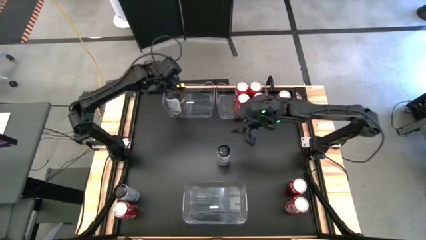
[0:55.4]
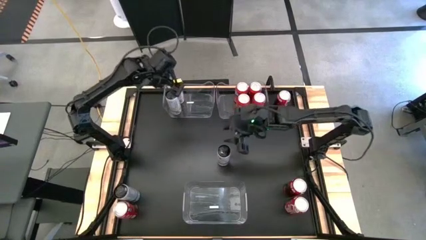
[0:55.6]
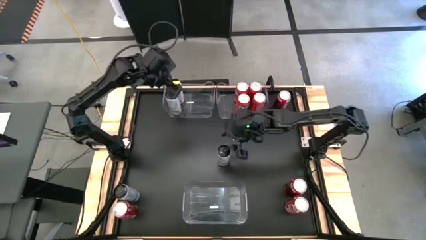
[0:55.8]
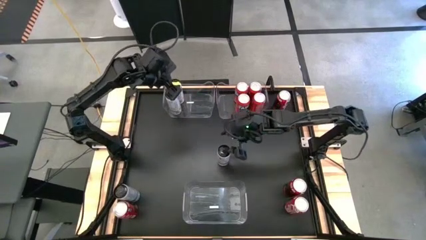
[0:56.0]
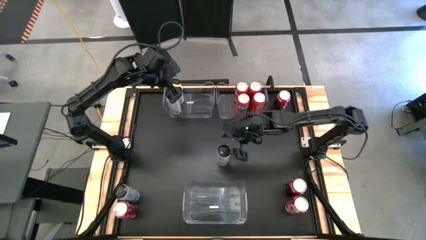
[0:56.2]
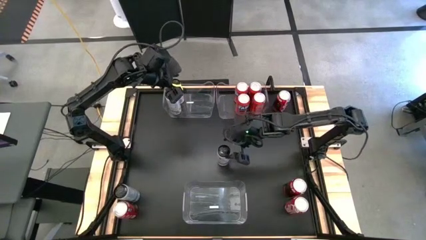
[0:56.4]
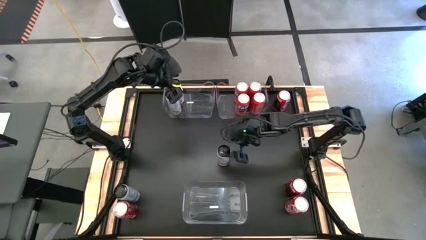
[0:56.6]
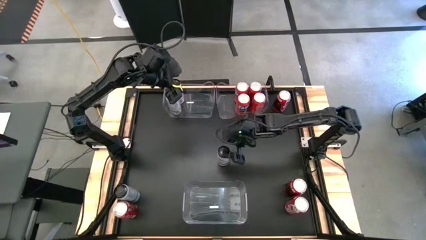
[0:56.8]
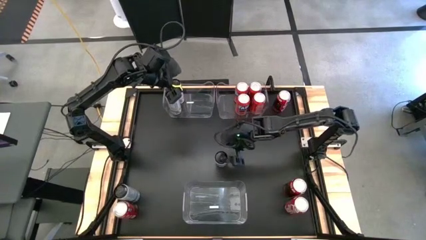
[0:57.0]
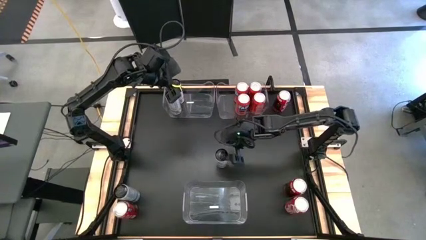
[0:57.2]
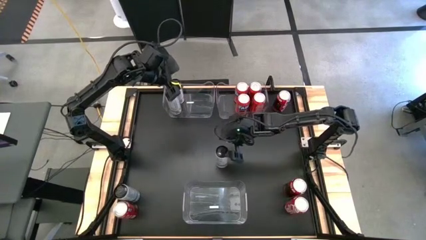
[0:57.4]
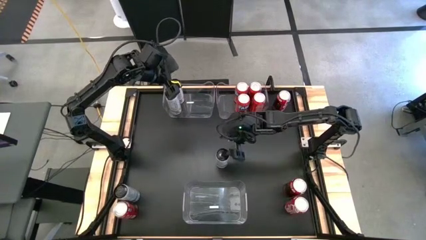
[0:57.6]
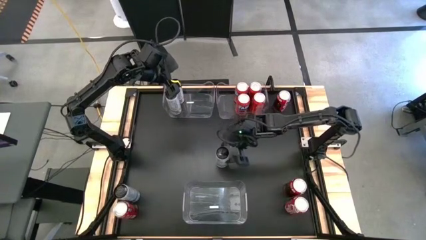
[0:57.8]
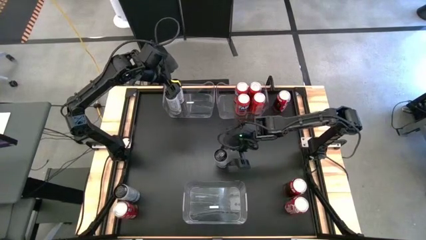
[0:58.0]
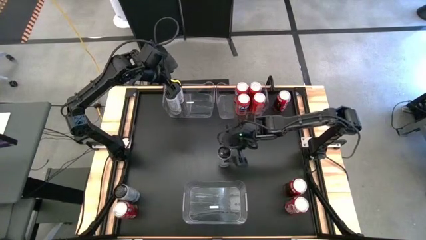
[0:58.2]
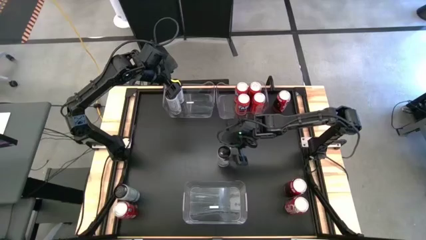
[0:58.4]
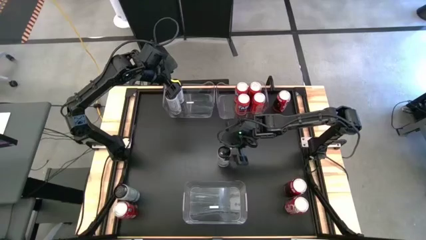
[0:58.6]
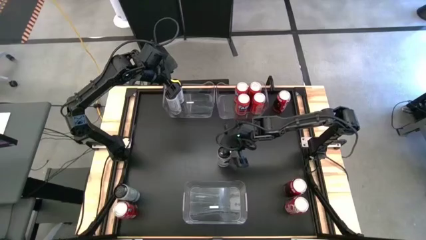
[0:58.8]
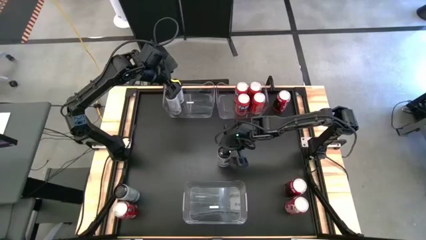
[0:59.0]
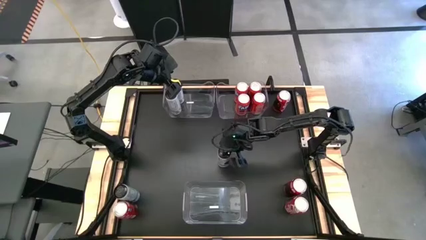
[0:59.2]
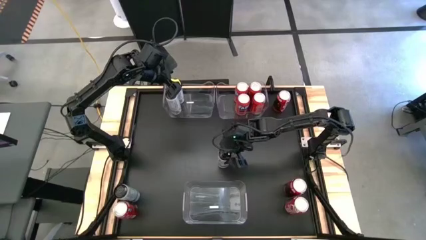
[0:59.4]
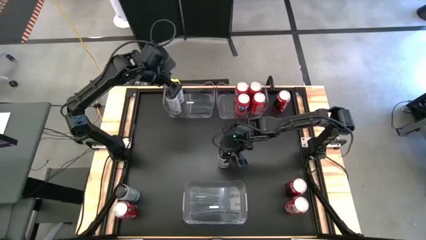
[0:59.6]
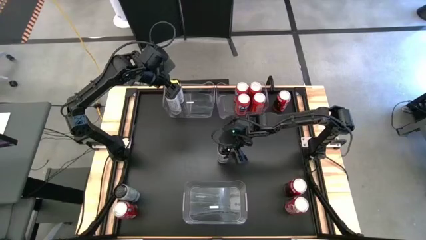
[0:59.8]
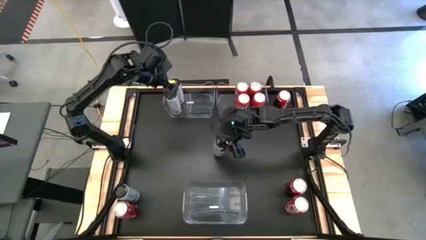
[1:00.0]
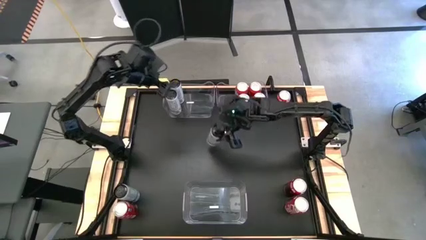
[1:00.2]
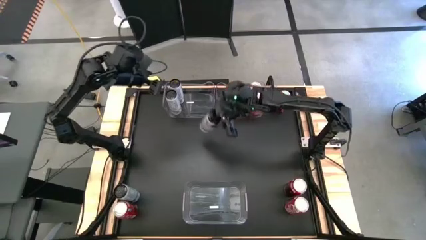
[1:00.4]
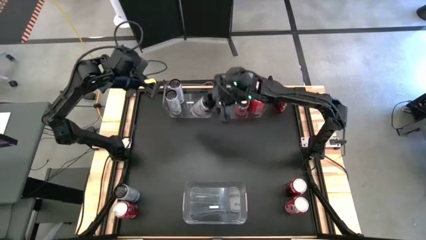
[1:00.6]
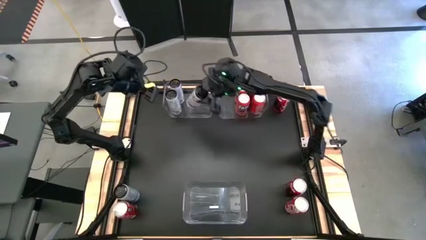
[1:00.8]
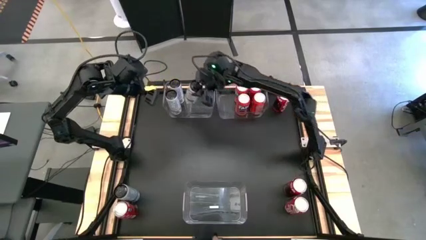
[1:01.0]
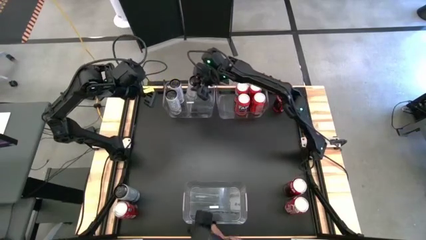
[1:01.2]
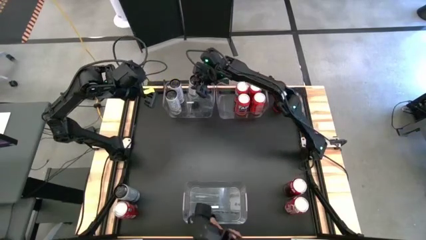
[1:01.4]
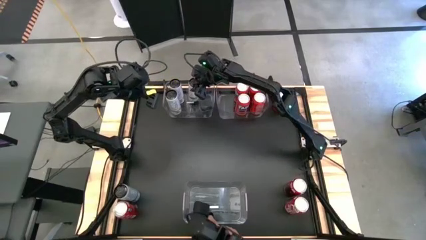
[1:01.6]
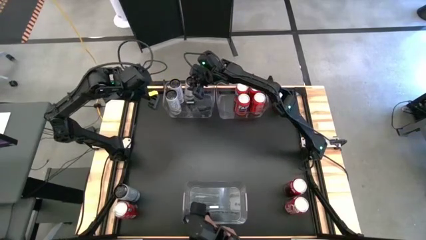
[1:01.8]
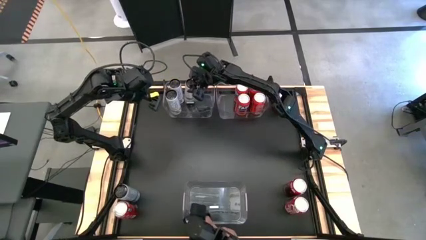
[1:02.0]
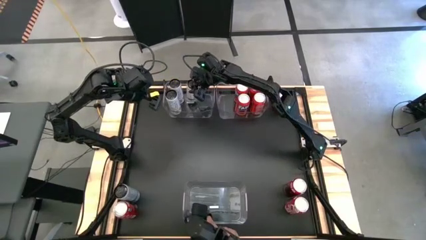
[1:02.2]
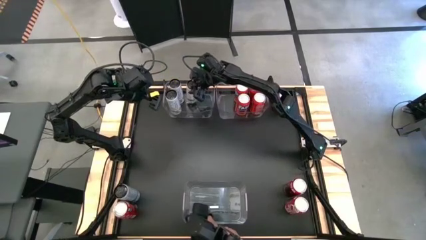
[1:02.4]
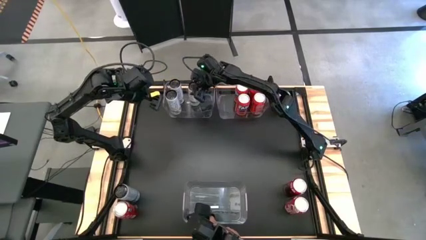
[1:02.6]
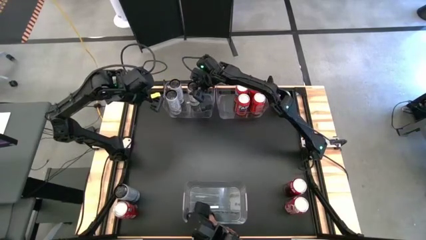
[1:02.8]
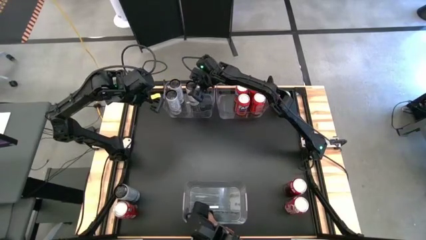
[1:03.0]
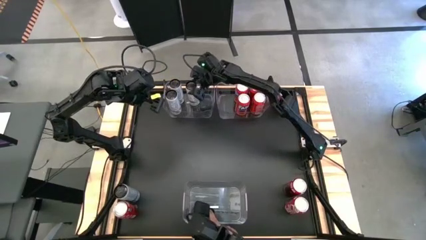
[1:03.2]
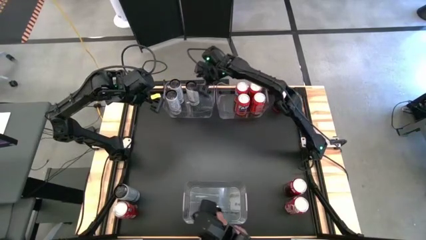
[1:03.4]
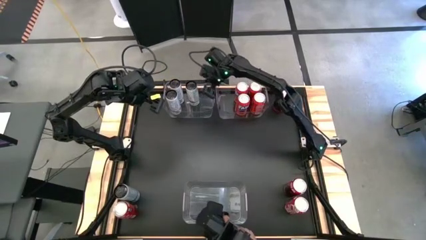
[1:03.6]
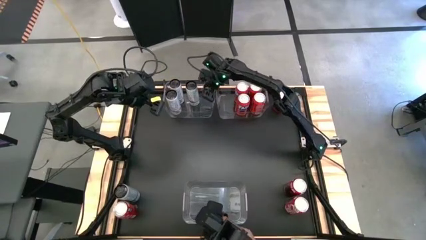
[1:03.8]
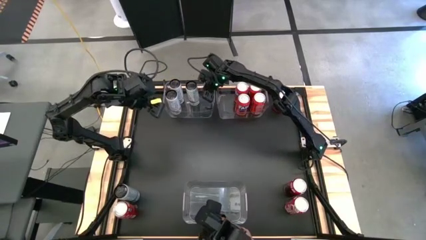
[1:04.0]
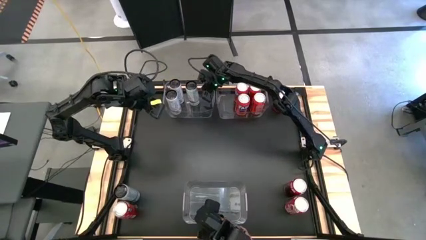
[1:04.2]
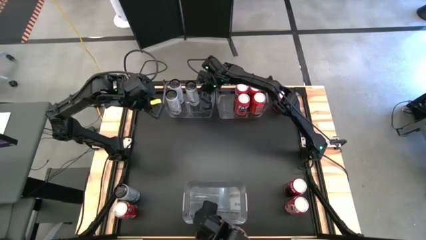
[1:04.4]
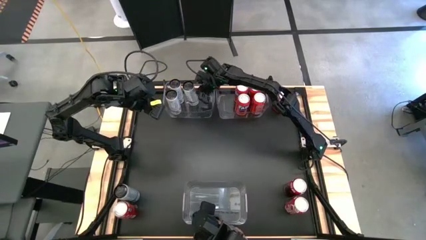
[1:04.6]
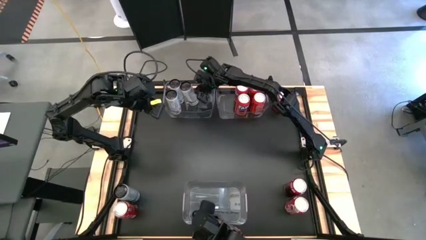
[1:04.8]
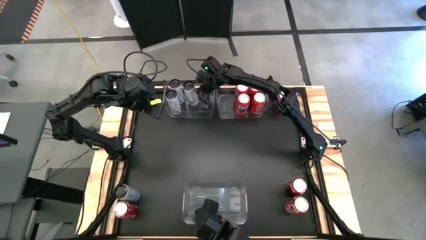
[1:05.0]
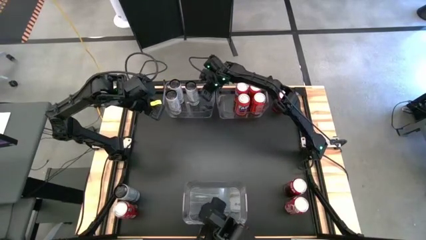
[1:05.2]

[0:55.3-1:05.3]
Task: Sort soda cans
Put the top white soda can into the top left transparent bin

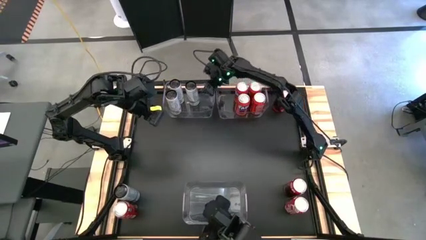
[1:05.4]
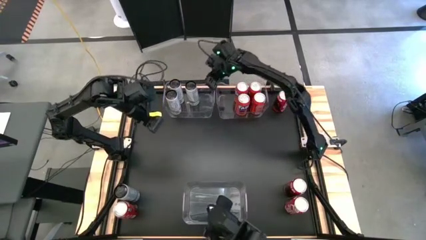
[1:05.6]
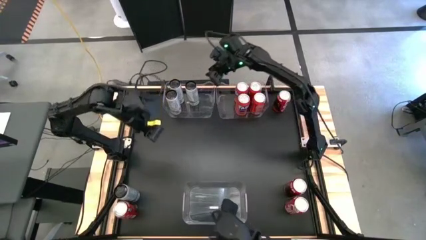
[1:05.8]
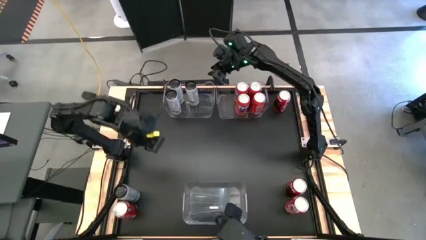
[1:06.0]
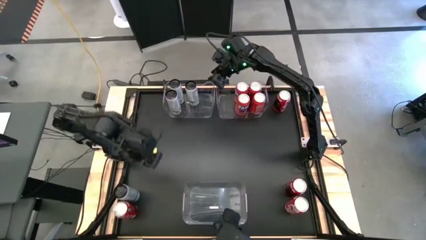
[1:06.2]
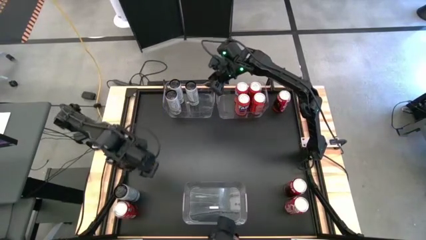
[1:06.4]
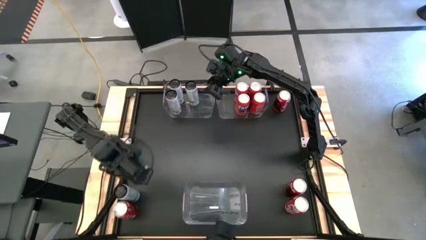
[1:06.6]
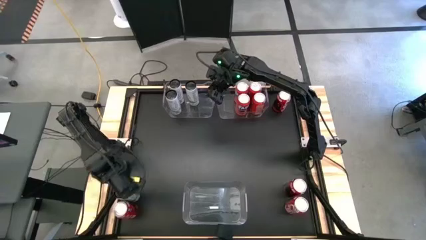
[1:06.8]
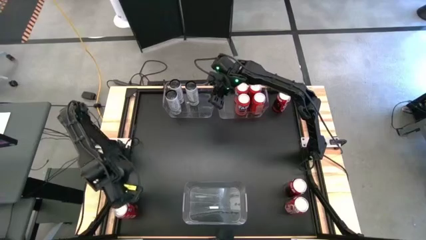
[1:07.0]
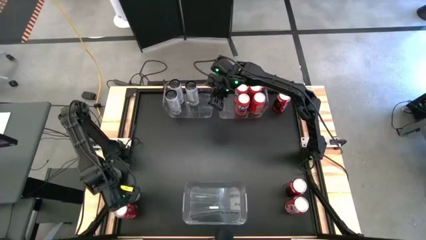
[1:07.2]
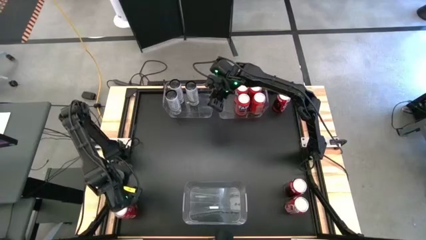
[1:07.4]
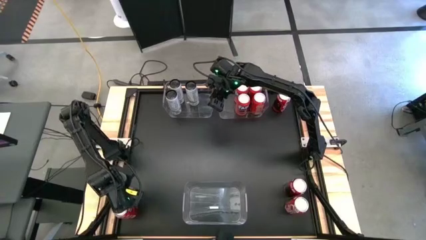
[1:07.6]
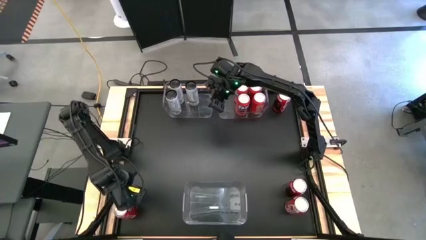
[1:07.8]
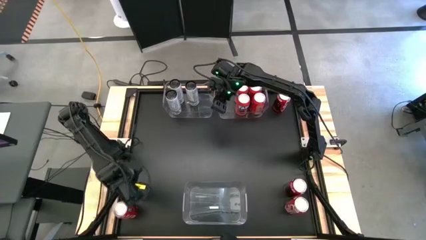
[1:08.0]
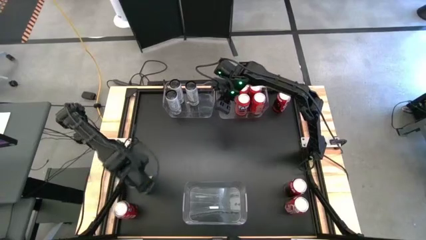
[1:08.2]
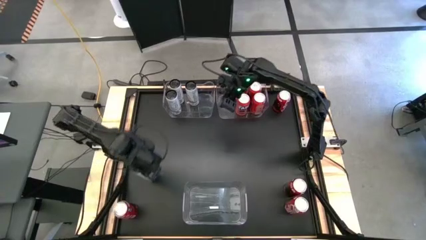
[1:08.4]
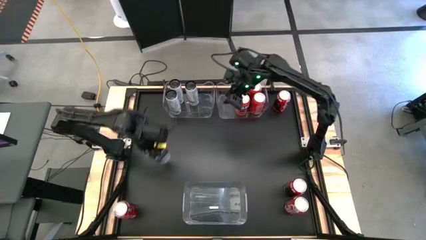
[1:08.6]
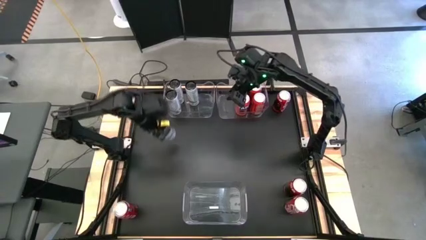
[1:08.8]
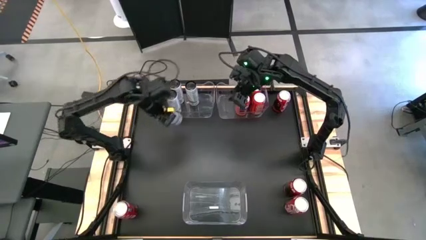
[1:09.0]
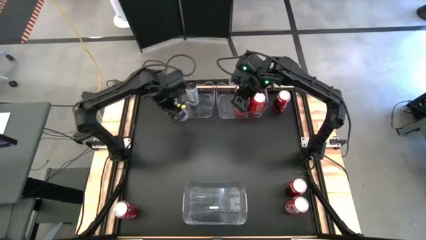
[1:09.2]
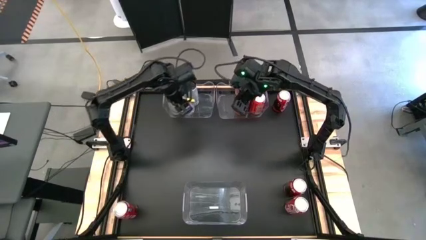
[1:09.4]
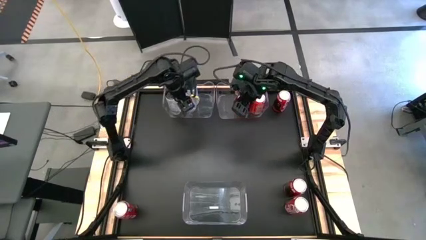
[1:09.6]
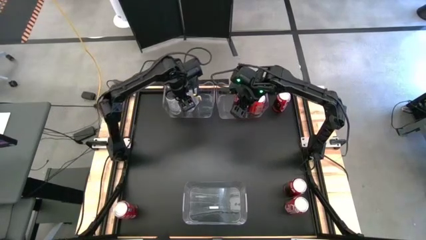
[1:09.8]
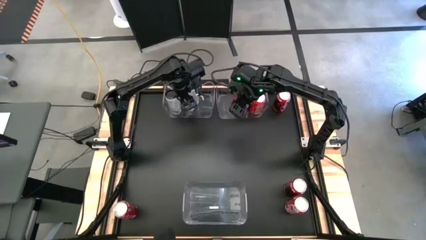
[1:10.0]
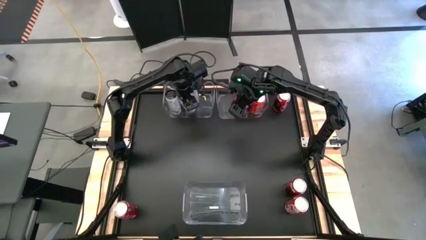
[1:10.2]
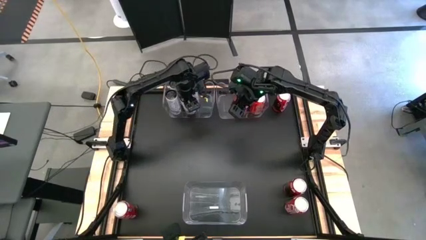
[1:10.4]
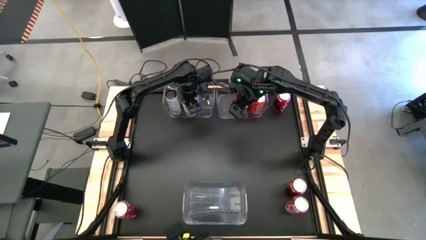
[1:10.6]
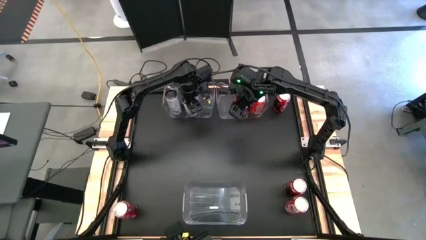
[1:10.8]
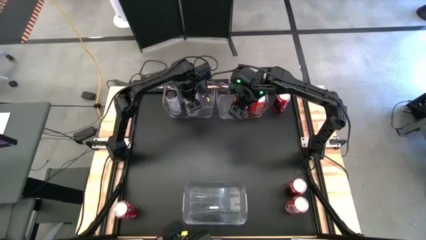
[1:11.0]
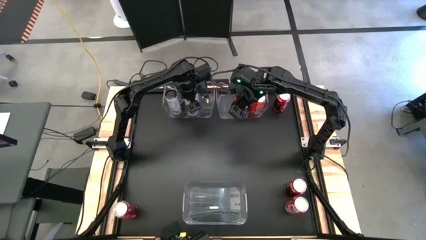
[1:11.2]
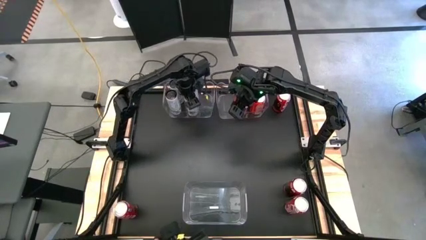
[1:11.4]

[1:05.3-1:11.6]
Put the white soda can into the top left transparent bin
